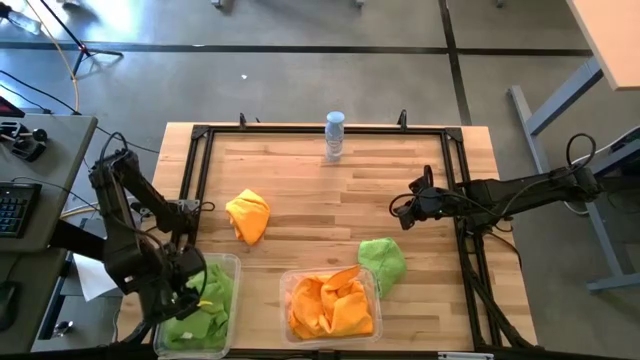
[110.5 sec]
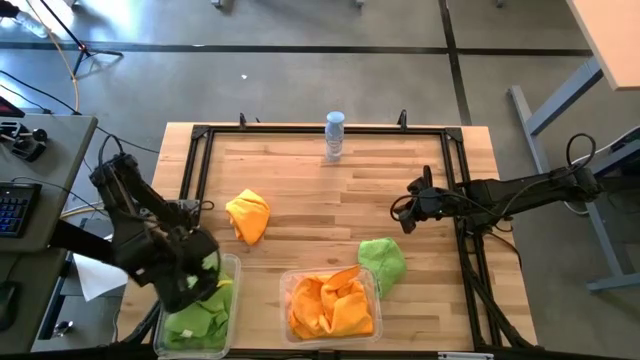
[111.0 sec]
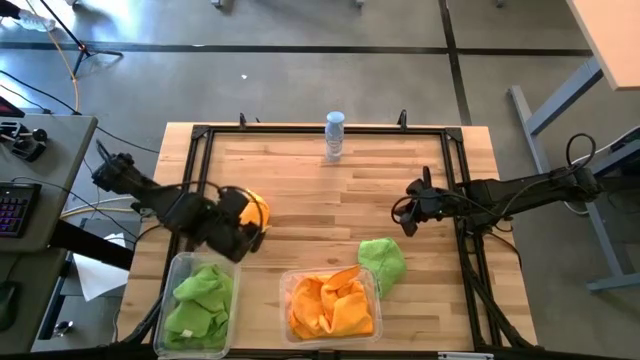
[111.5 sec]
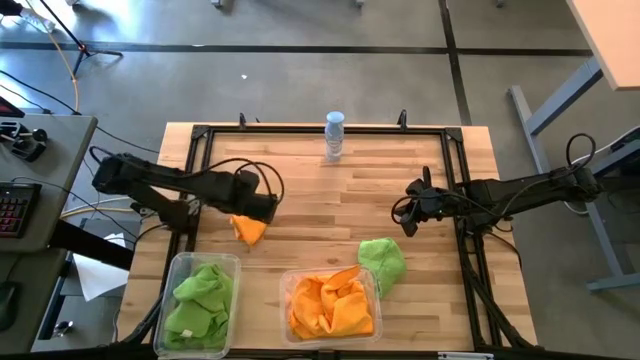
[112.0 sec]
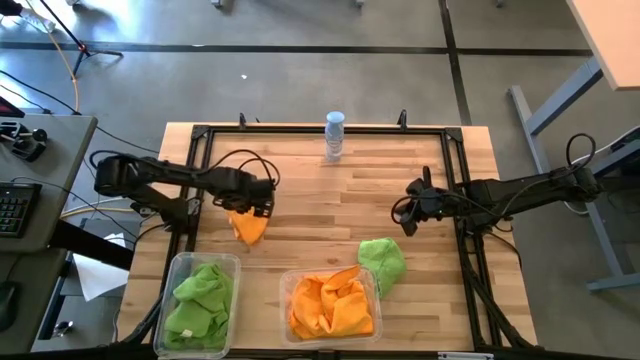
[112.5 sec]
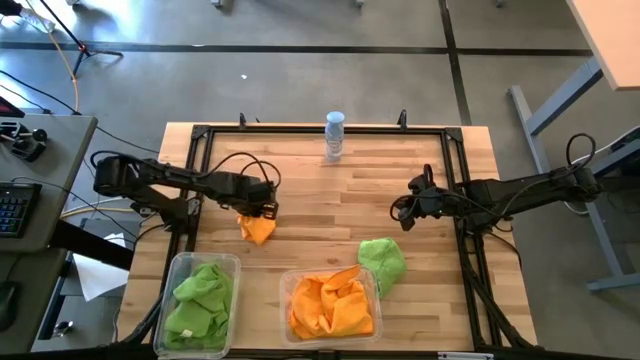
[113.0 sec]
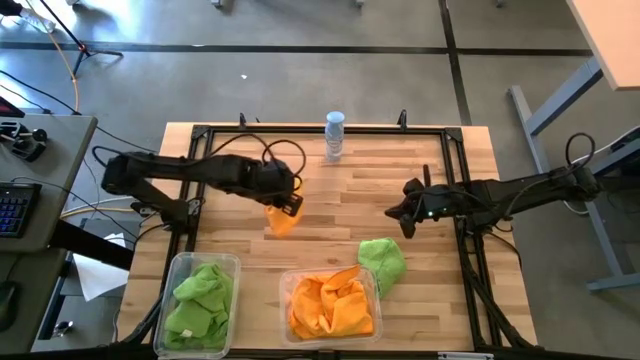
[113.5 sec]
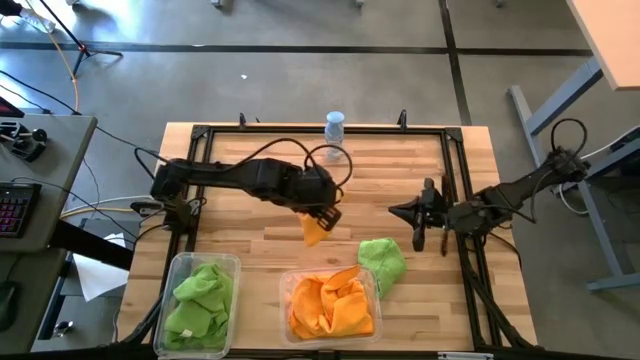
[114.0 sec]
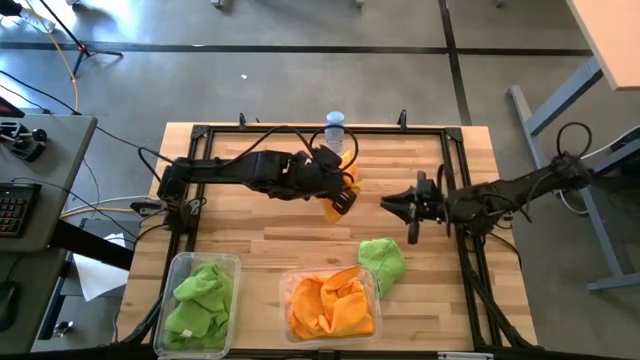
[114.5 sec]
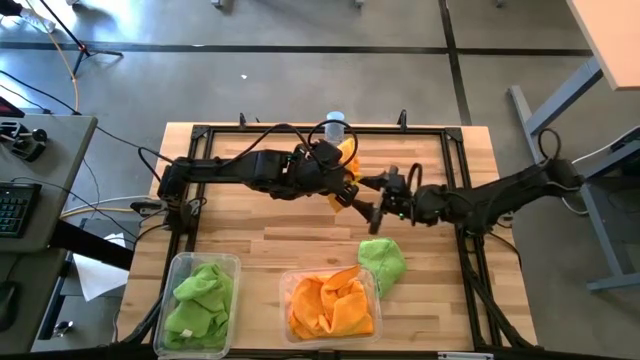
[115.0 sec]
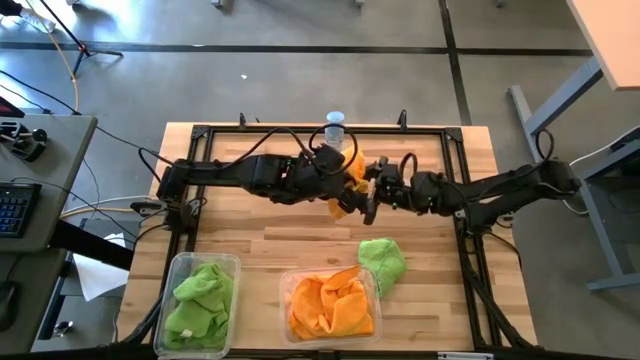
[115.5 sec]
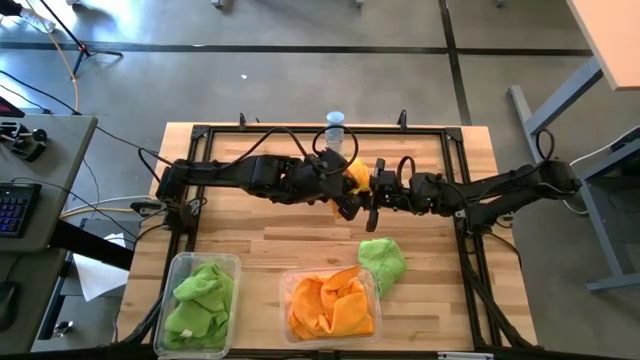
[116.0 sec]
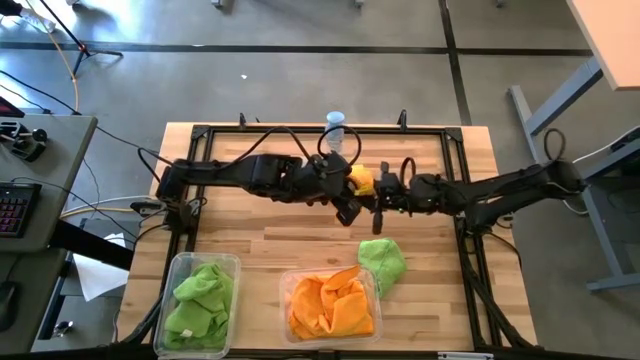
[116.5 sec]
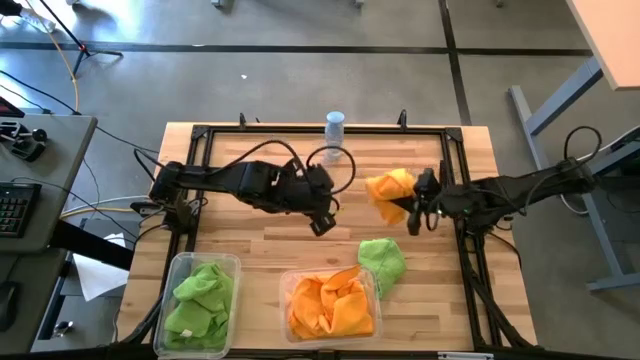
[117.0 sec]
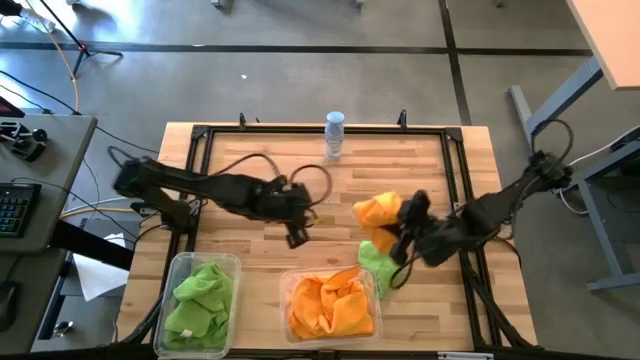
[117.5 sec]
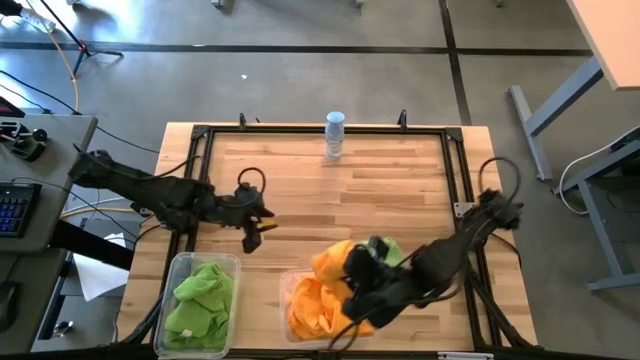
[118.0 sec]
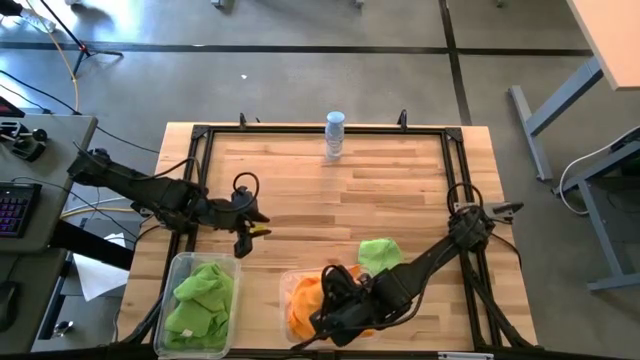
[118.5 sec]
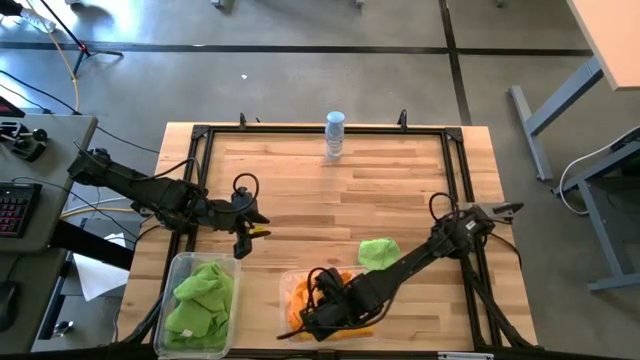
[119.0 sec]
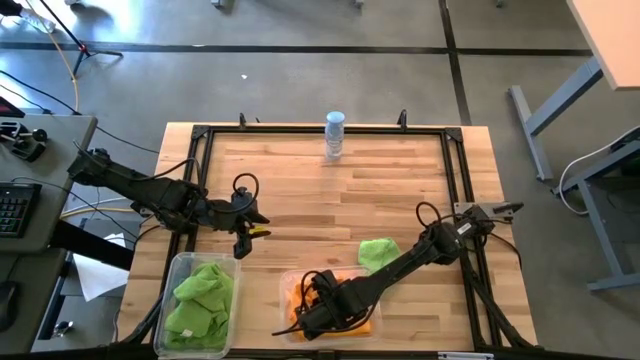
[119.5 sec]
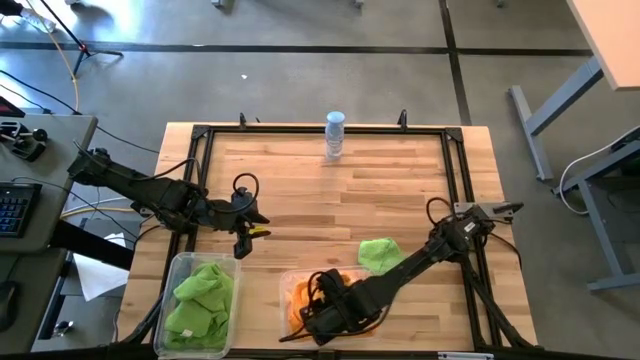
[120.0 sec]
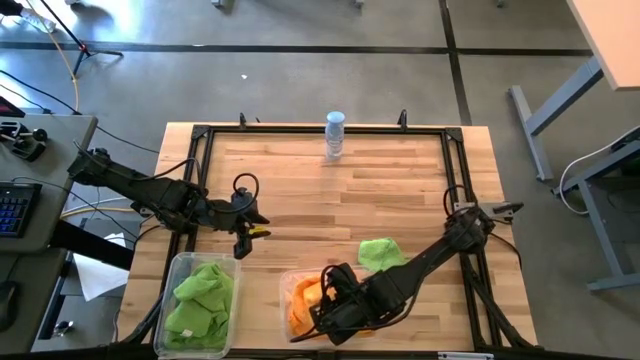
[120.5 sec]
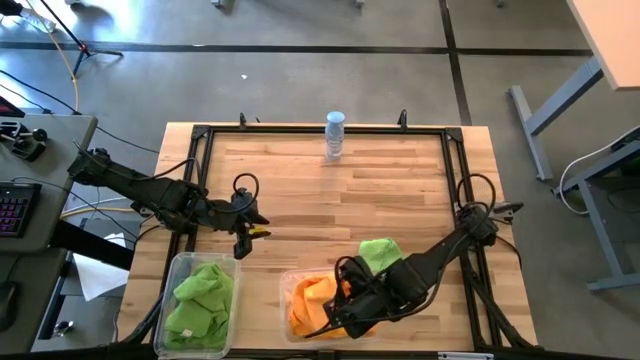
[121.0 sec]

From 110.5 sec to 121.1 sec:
Task: Sort microfiber towel by color & place in baskets
Put the orange microfiber towel into the right transparent bin

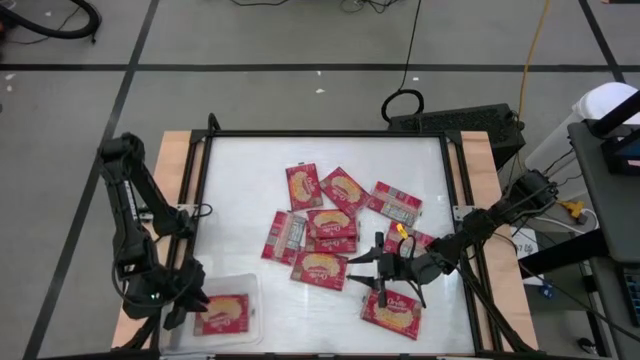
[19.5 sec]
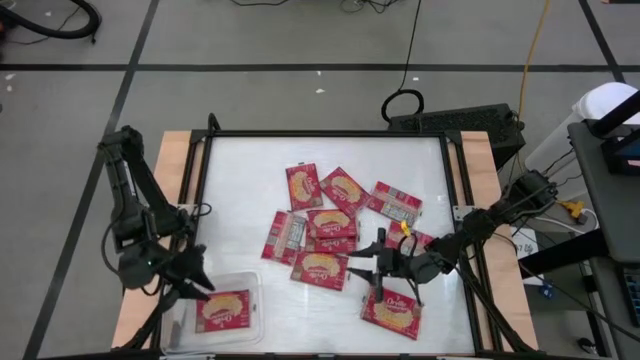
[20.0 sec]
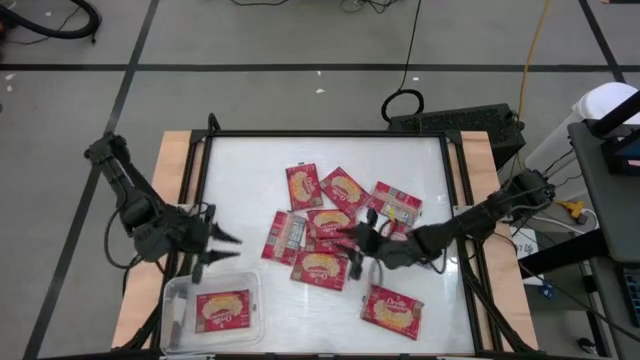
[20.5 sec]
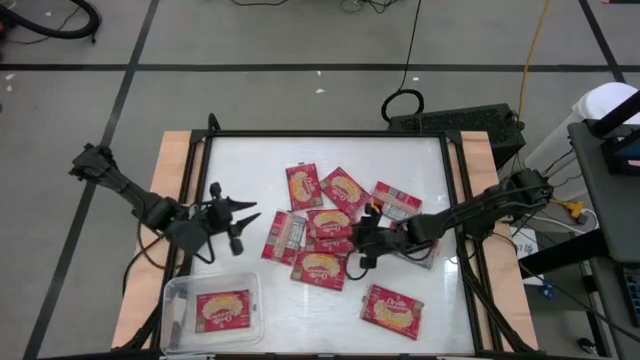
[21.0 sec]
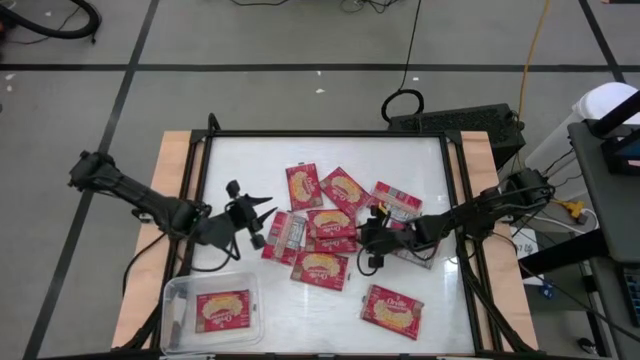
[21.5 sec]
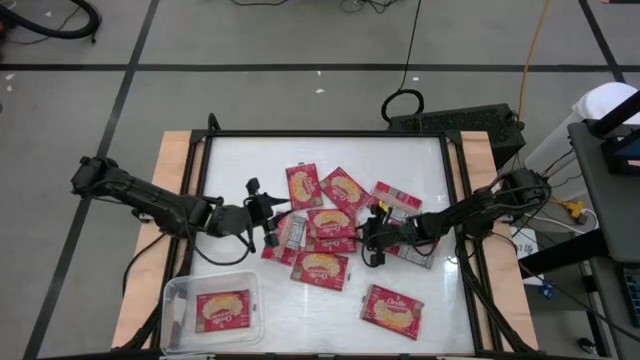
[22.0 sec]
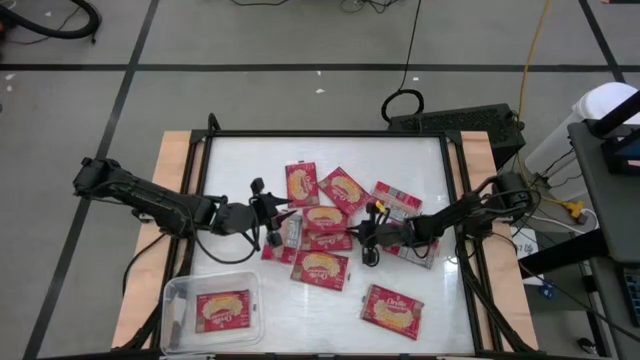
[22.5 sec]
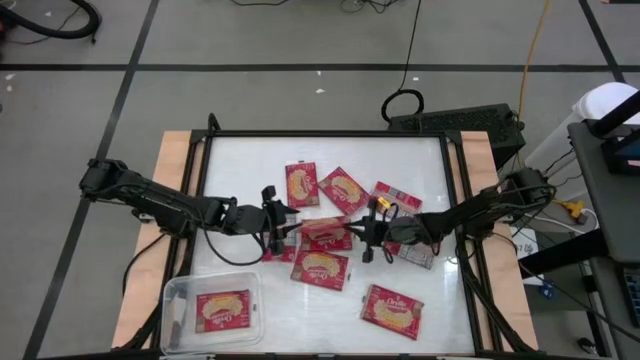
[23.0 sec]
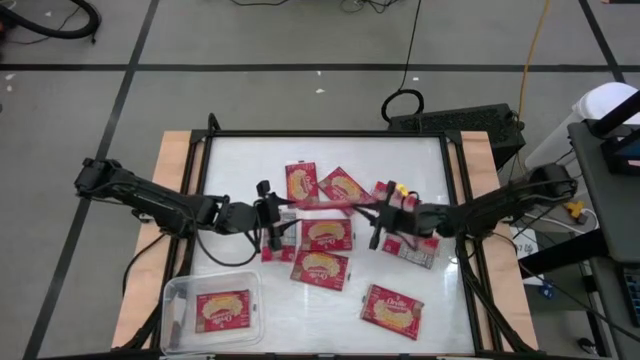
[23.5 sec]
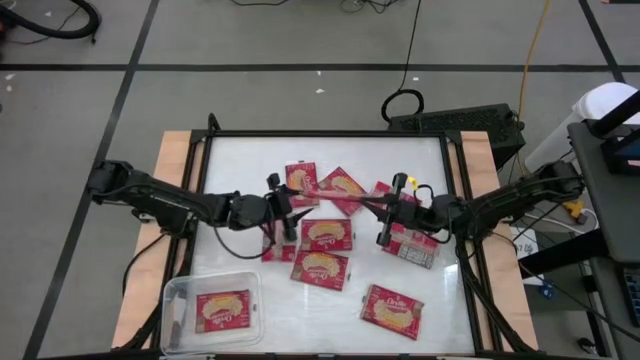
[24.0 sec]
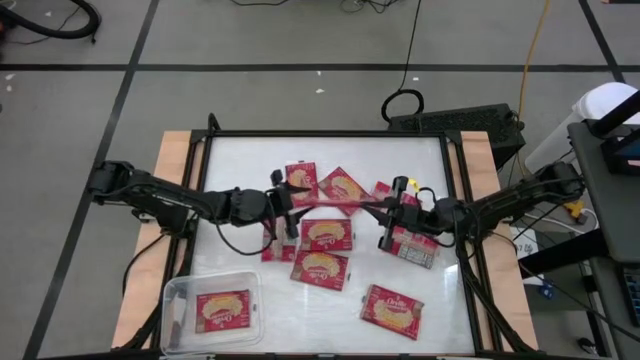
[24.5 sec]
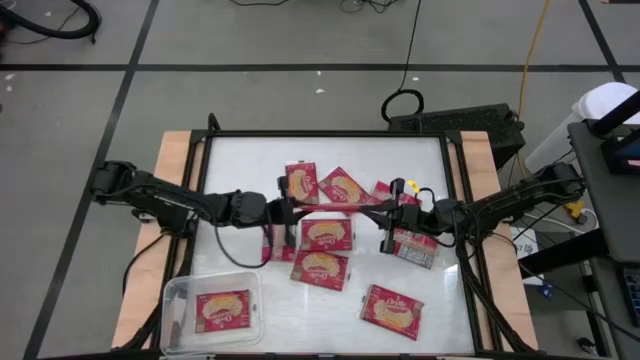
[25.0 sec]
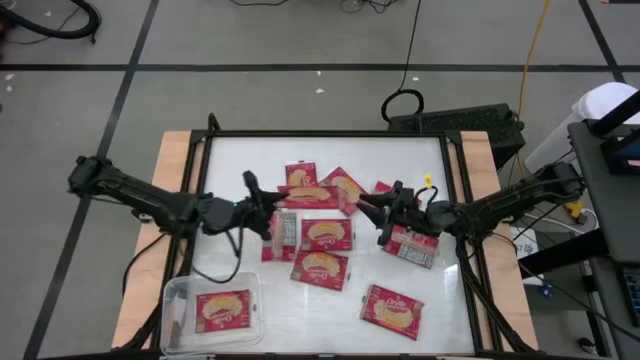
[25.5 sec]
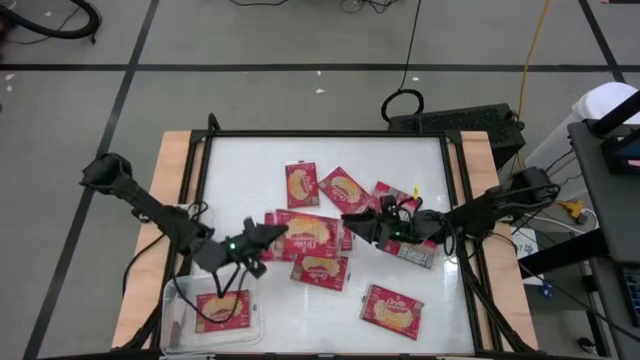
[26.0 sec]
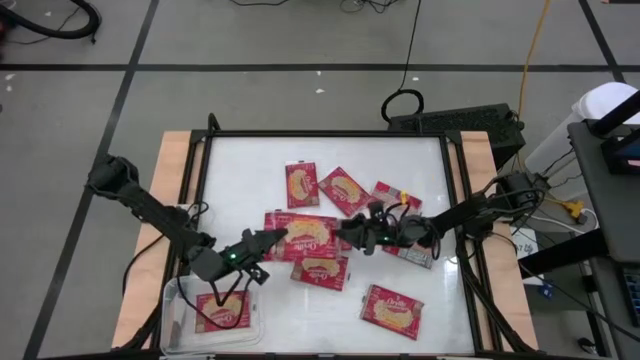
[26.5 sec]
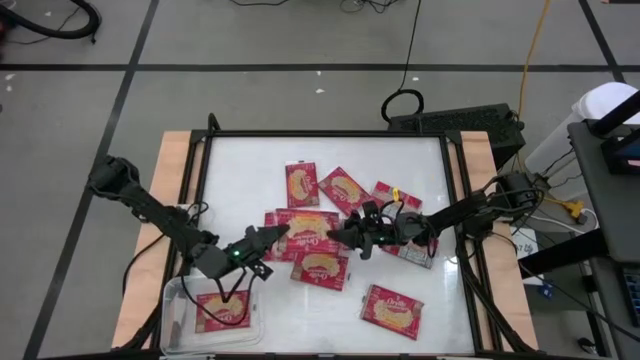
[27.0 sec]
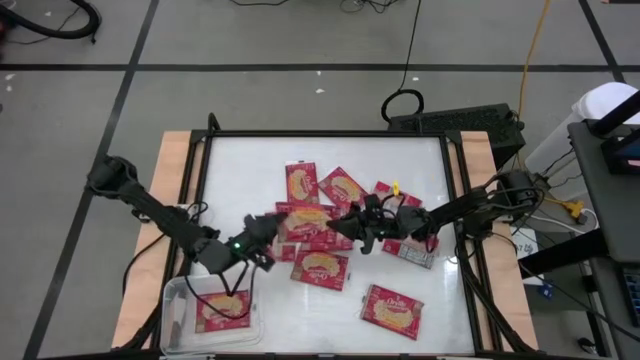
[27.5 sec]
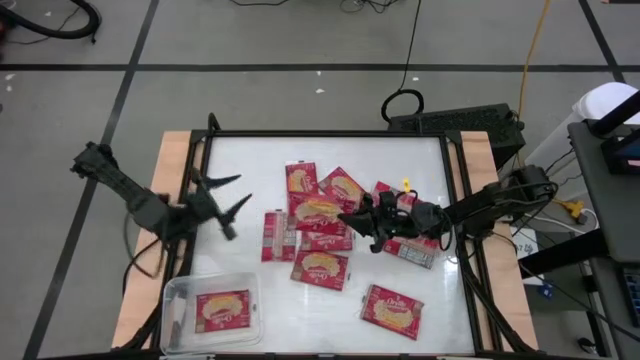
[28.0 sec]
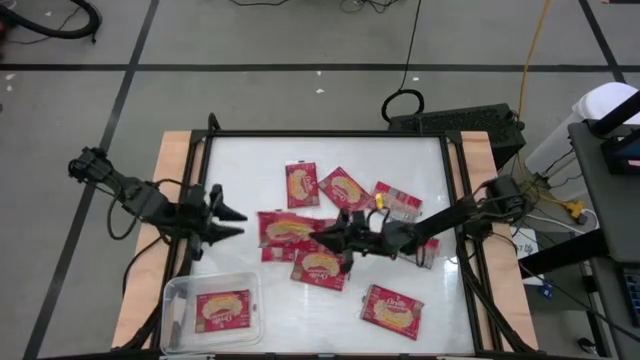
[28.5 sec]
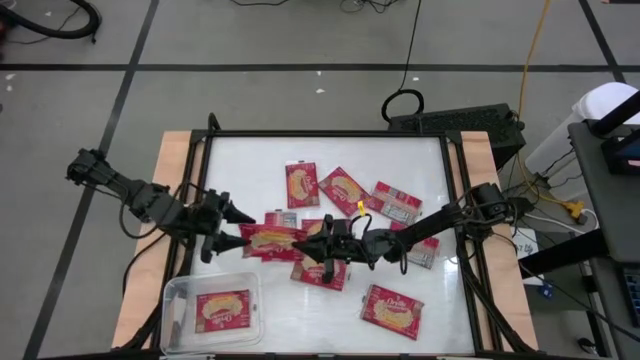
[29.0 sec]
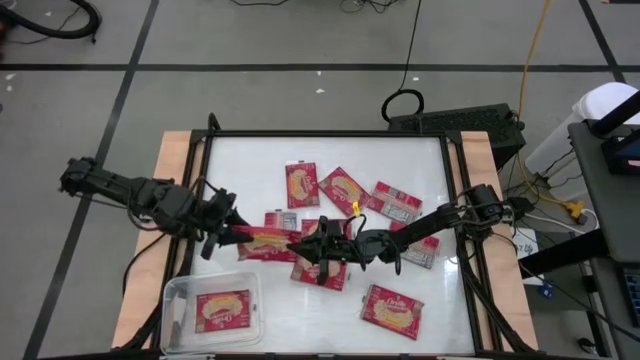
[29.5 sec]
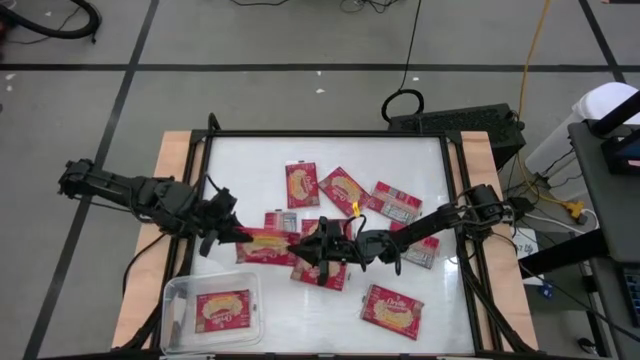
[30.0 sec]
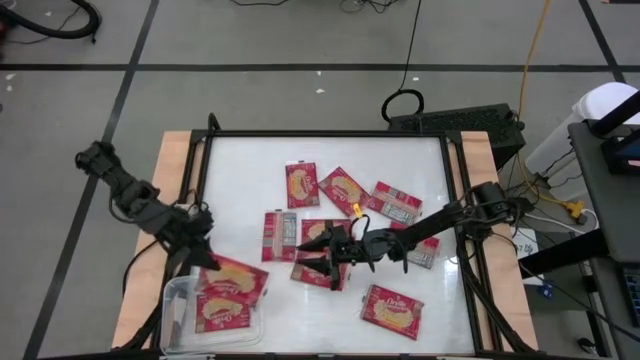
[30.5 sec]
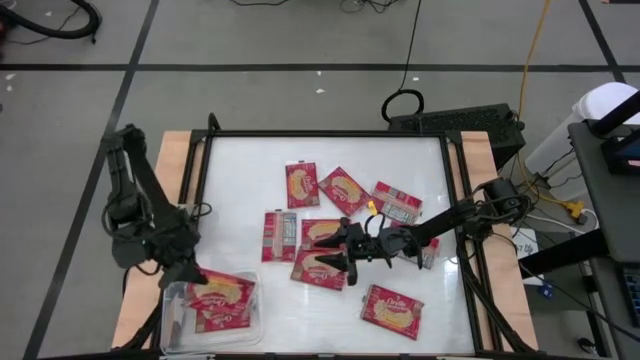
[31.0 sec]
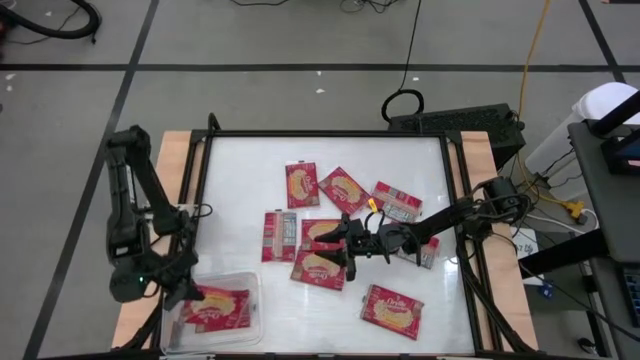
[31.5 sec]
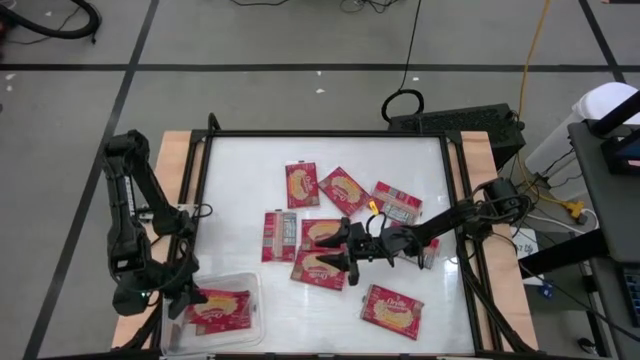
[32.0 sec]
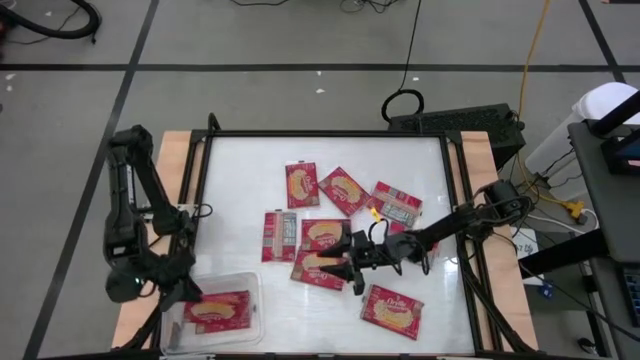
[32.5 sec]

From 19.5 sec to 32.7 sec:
Task: Sort popcorn bags into baskets
Put the popcorn bag into the transparent bin
